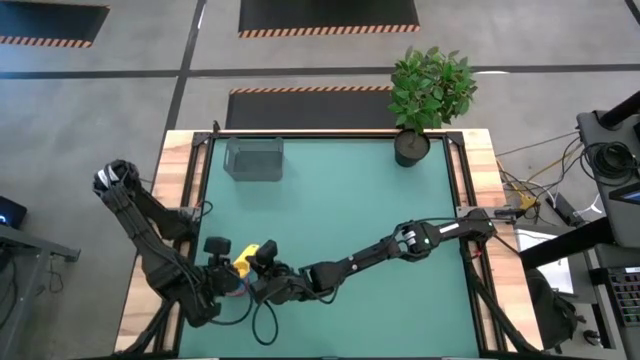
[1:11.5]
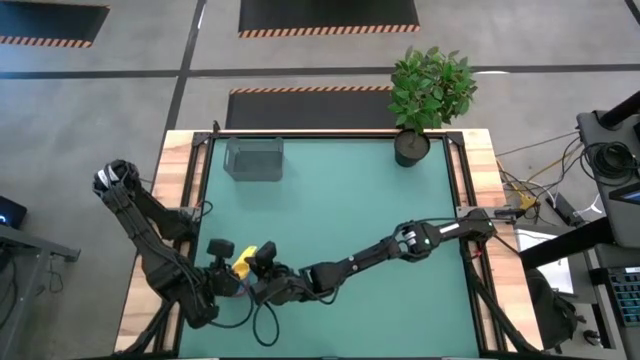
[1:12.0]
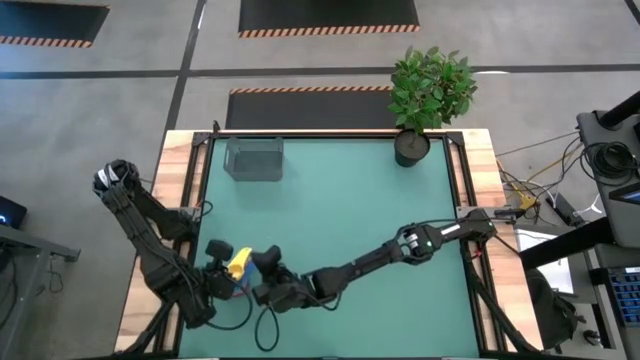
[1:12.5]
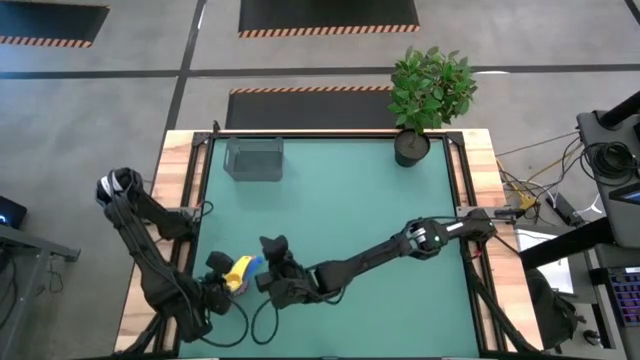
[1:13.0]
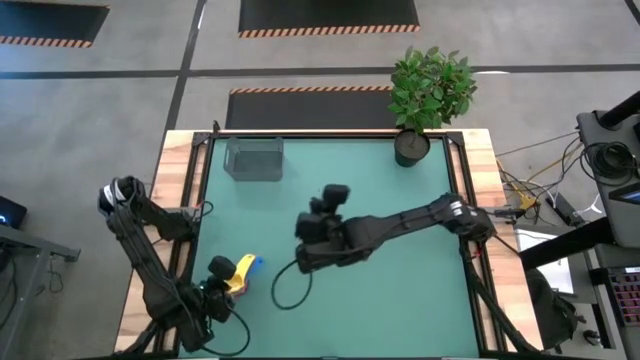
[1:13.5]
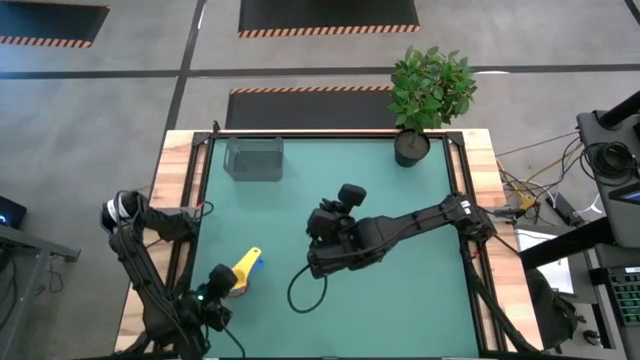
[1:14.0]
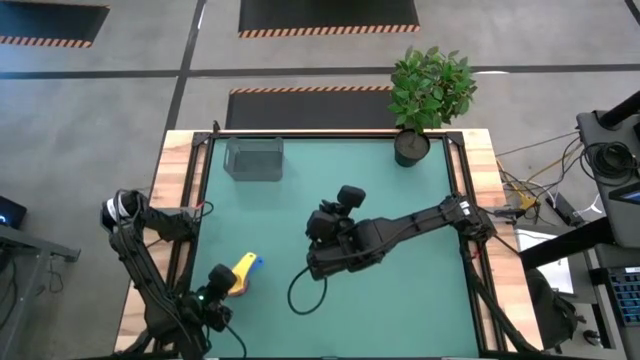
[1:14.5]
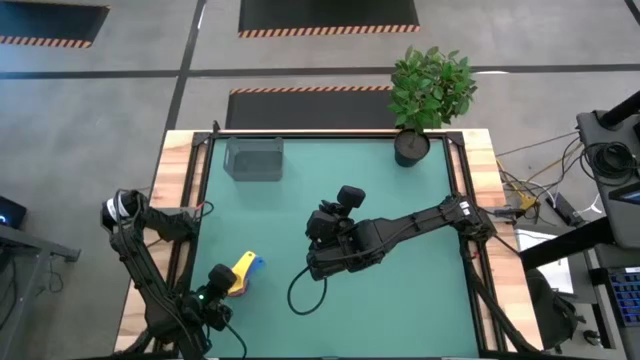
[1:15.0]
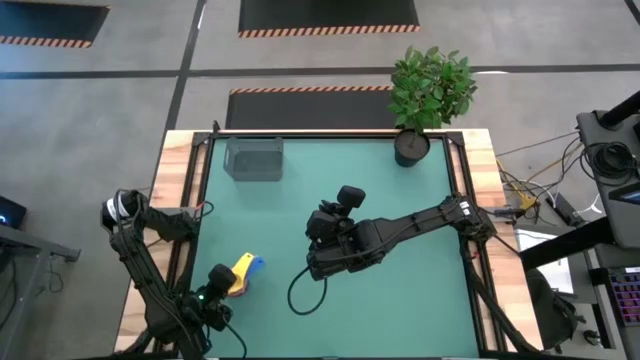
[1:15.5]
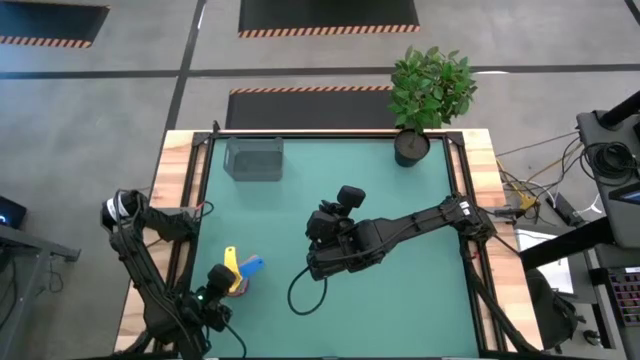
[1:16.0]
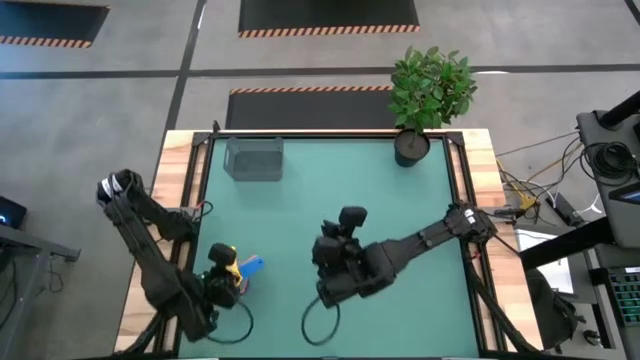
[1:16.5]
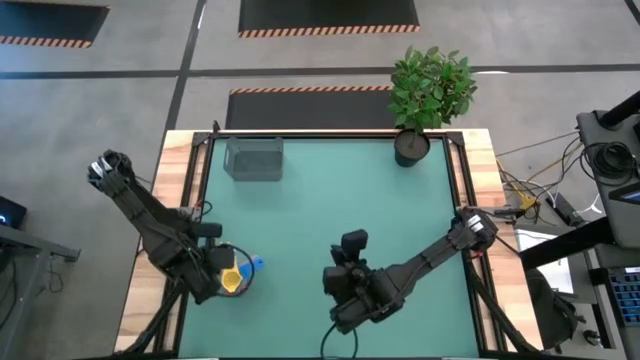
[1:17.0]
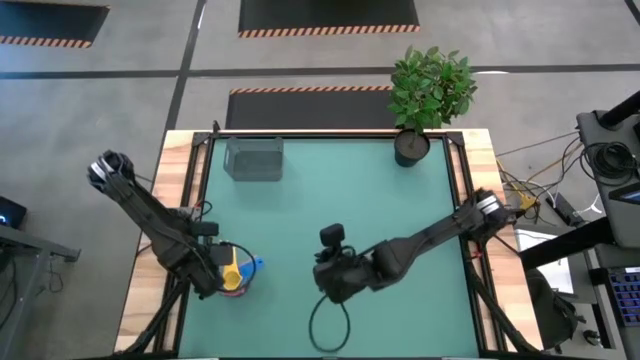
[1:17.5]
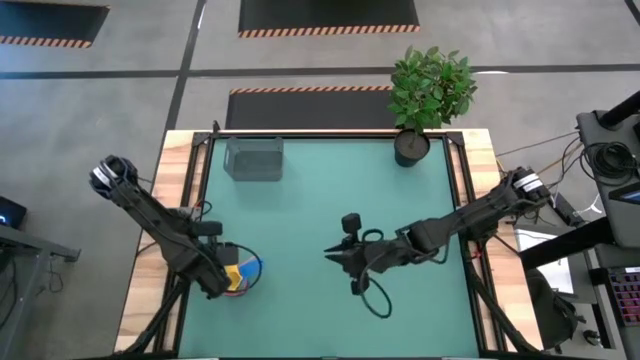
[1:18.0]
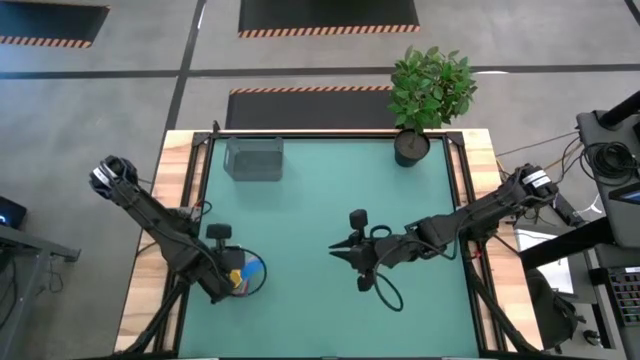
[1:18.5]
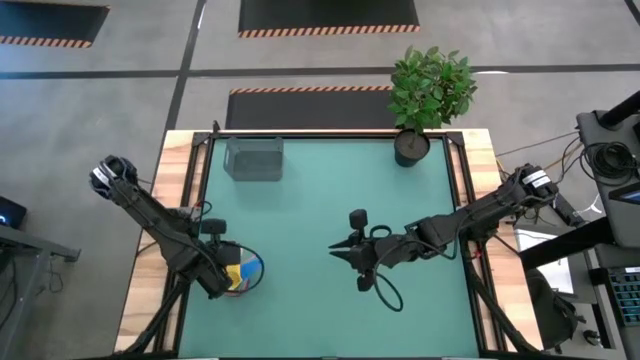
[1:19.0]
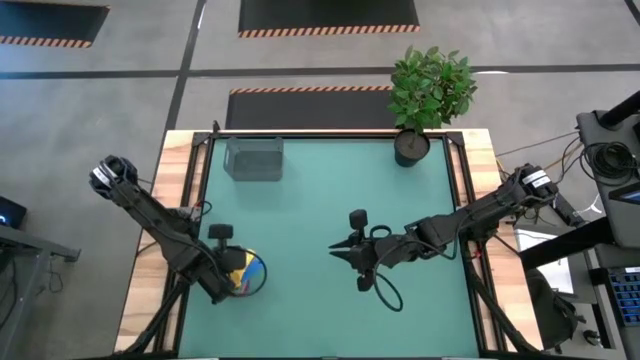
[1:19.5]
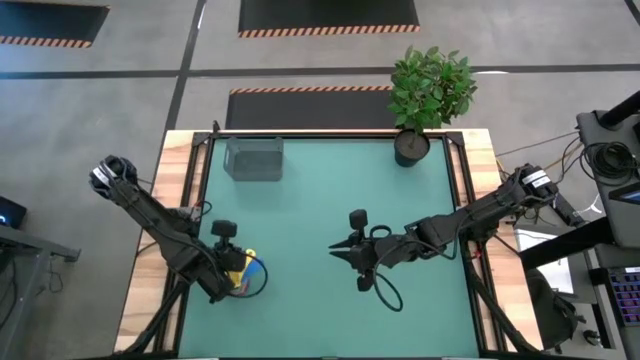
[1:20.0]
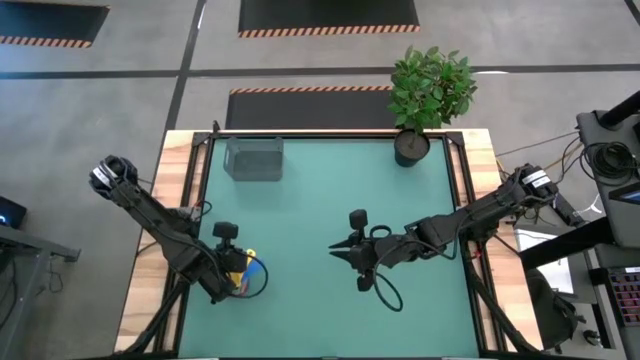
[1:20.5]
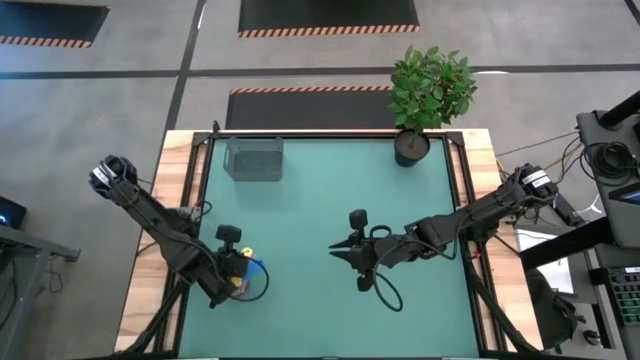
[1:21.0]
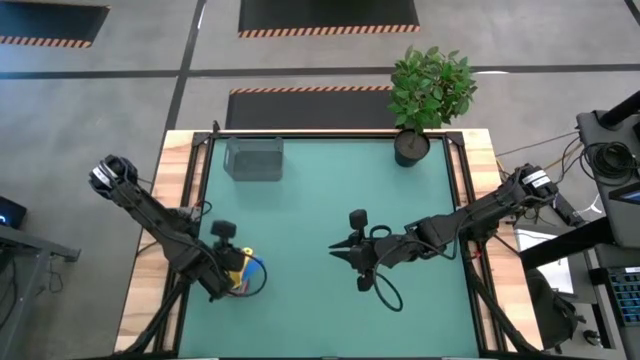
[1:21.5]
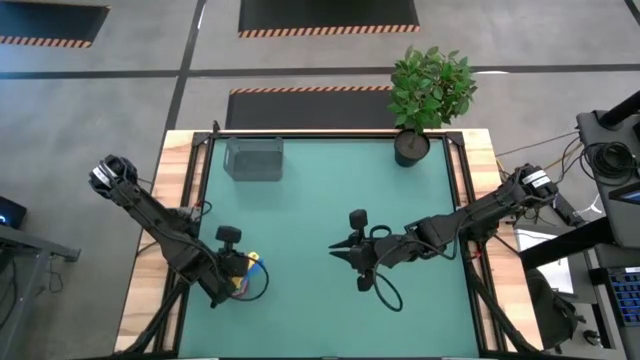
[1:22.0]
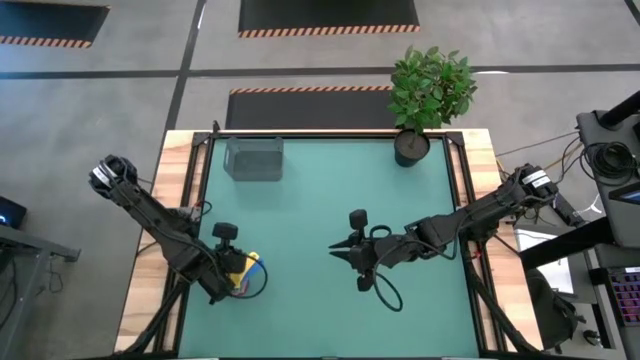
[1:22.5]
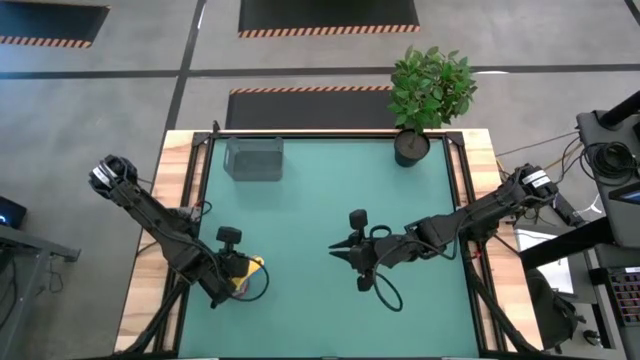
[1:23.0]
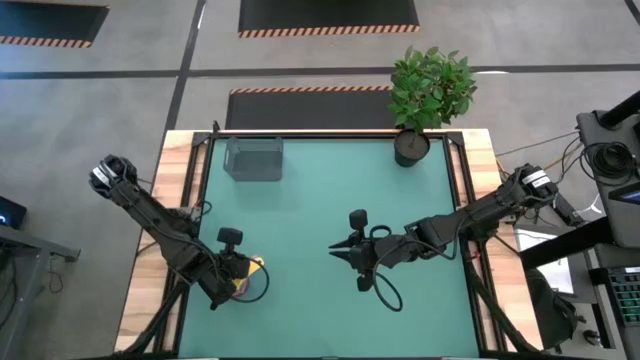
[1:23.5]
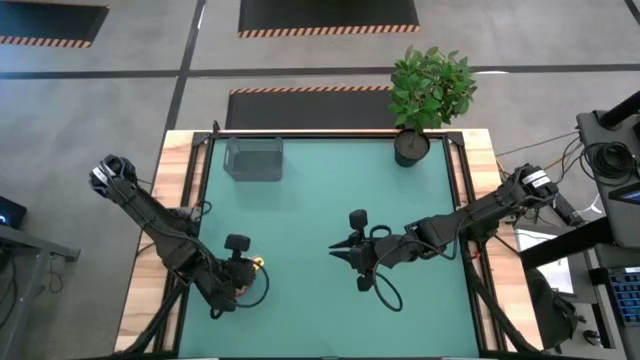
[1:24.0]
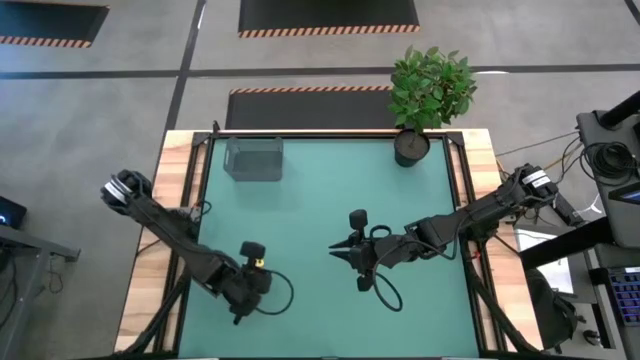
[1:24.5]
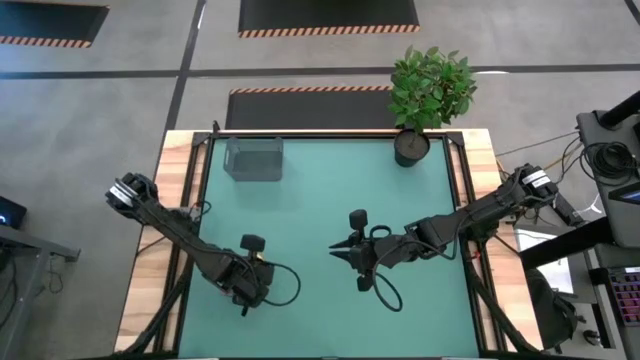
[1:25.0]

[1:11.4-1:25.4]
Task: Nest measuring cups in basket
Stack the yellow measuring cup on top of the blue measuring cup

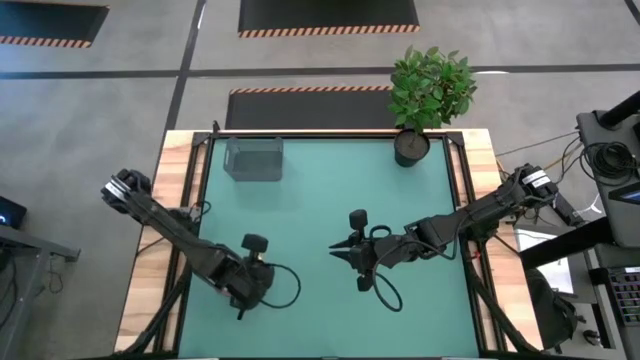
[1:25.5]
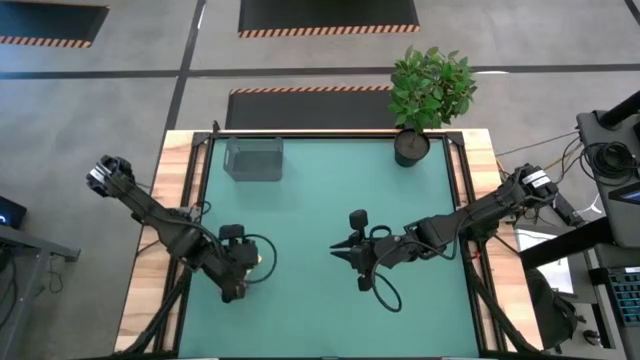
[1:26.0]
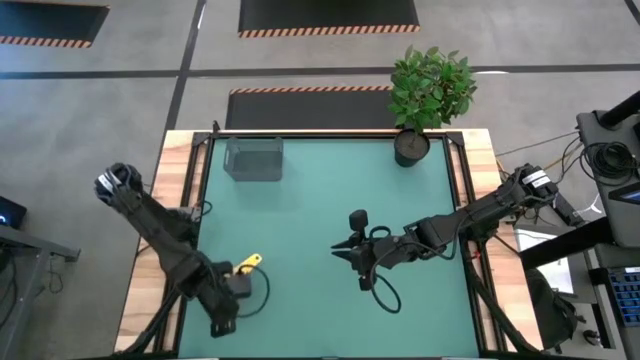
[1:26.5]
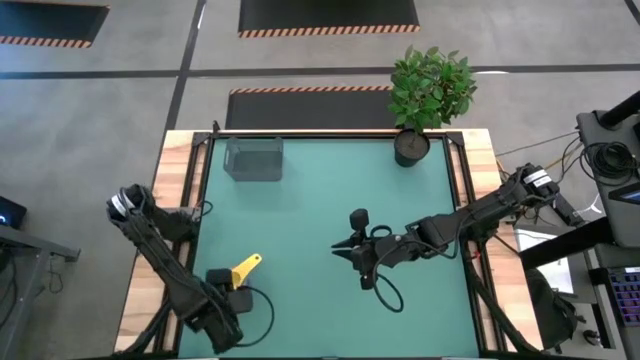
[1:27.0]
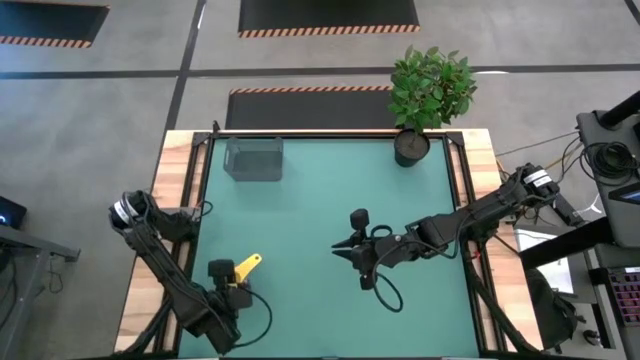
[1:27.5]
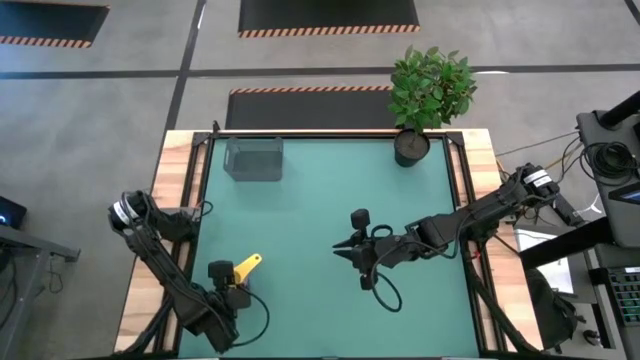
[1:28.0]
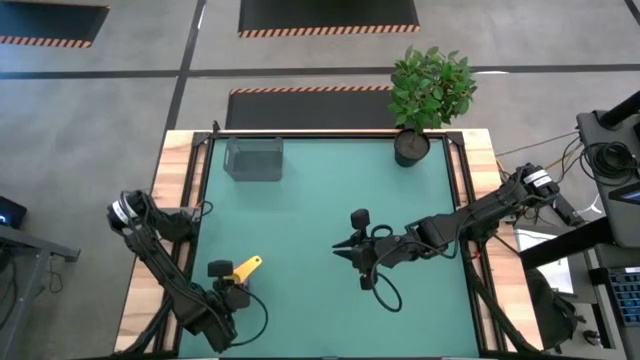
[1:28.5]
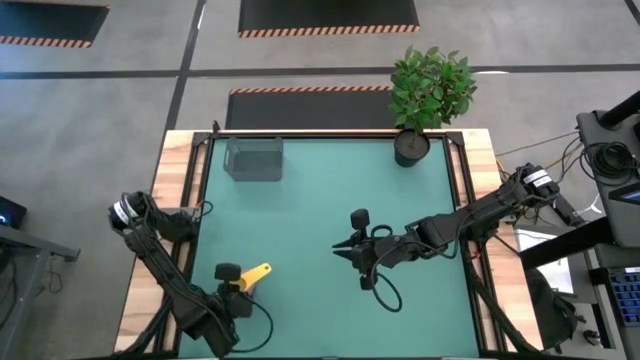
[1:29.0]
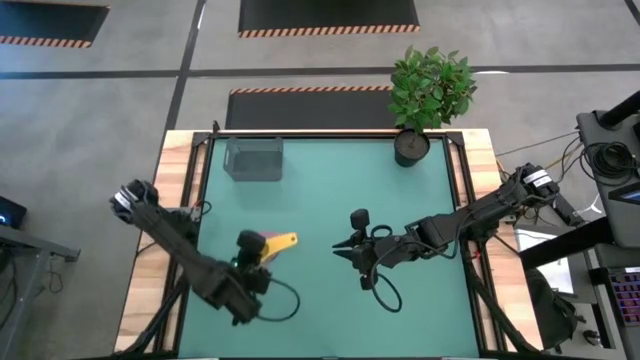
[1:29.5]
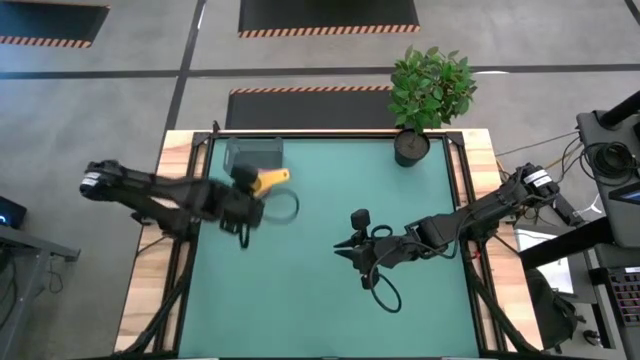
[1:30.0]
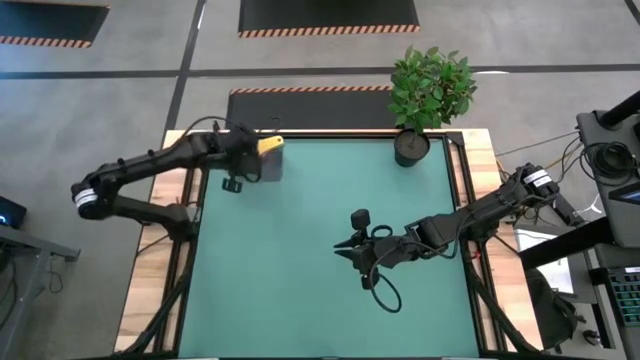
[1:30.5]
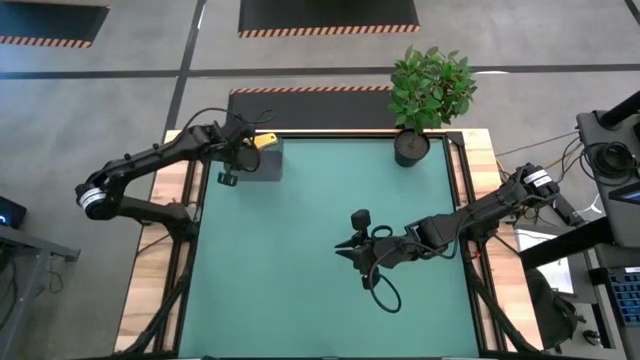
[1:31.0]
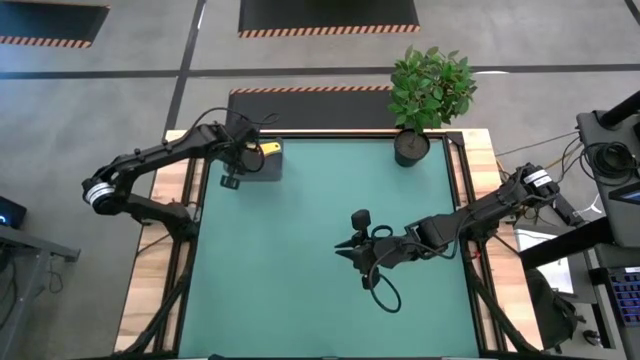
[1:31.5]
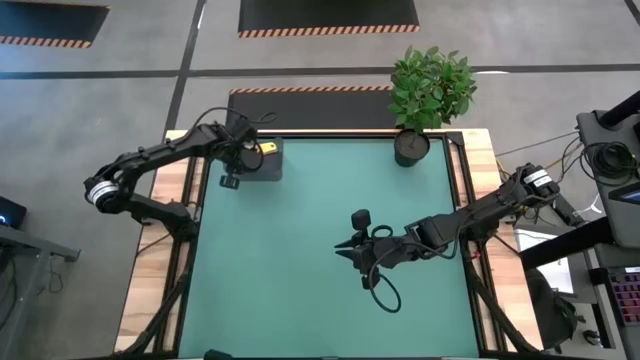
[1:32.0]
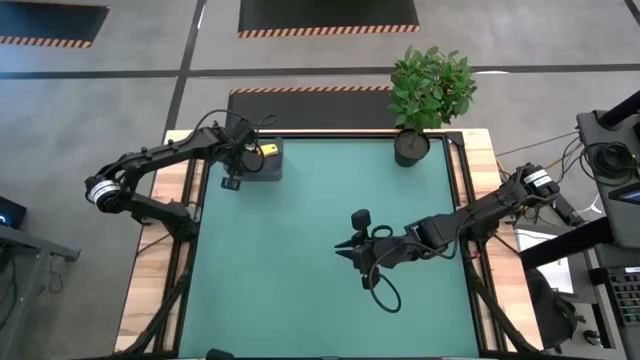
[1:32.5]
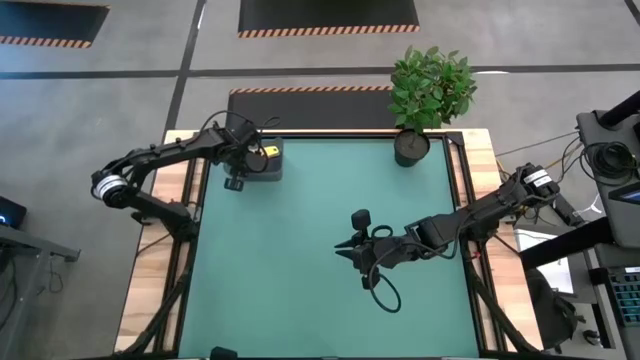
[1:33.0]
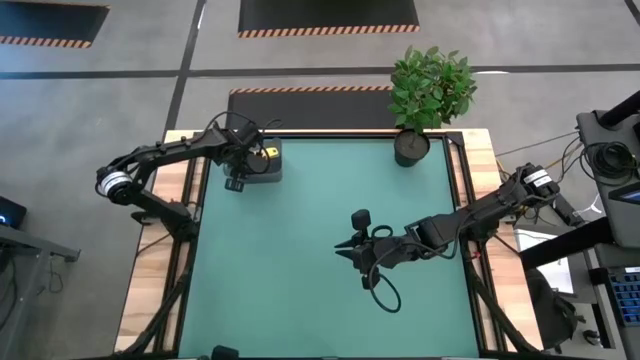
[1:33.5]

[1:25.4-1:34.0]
Put the stacked measuring cups into the black bin
